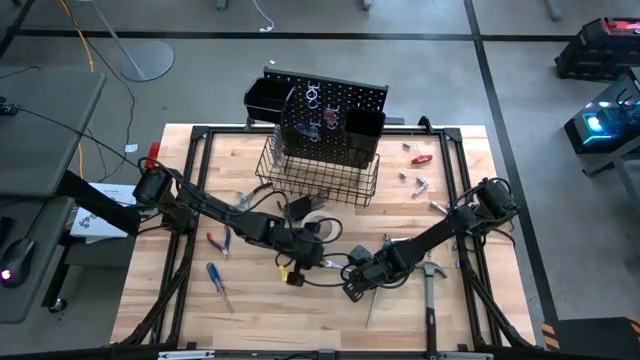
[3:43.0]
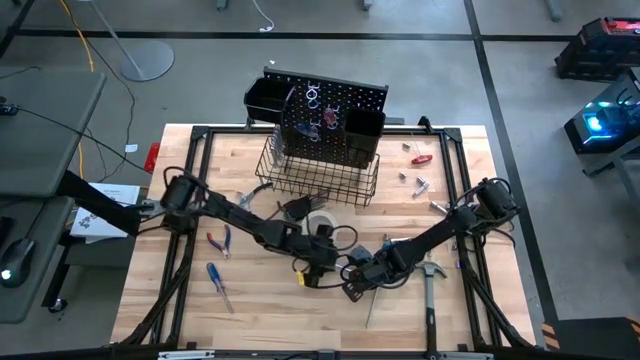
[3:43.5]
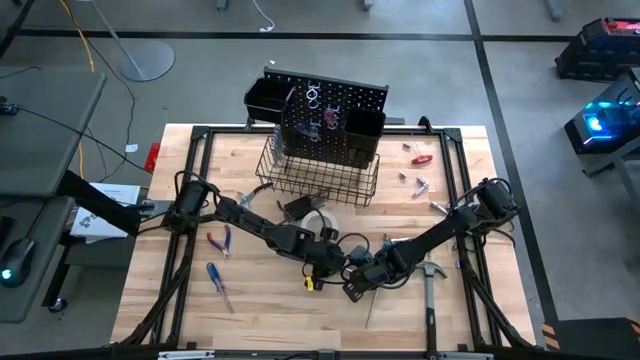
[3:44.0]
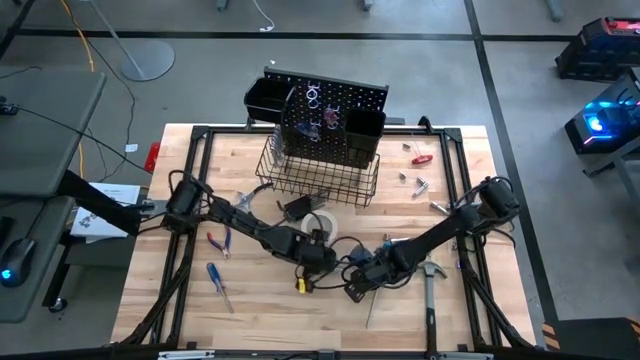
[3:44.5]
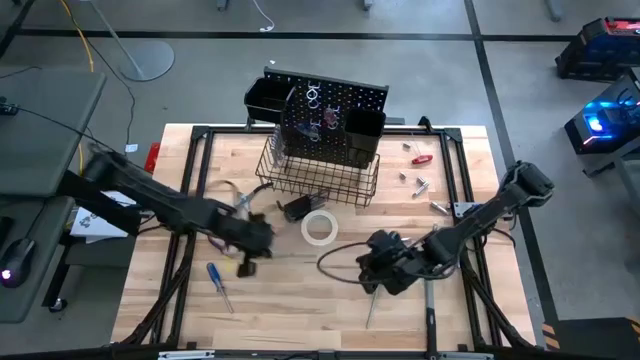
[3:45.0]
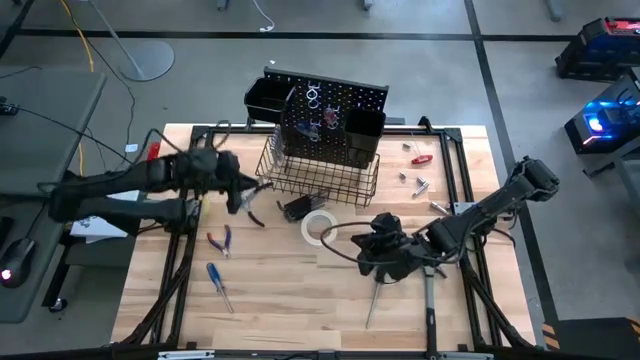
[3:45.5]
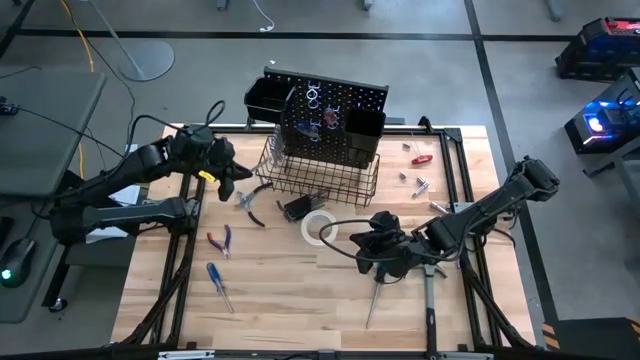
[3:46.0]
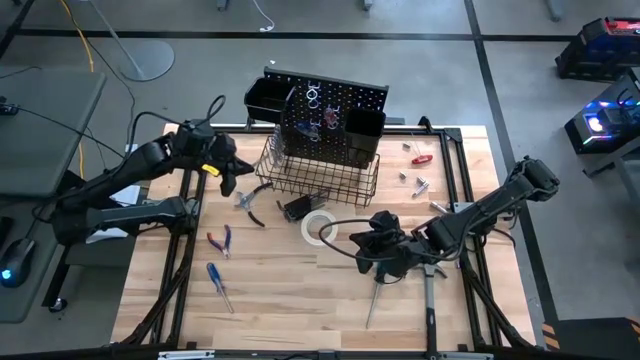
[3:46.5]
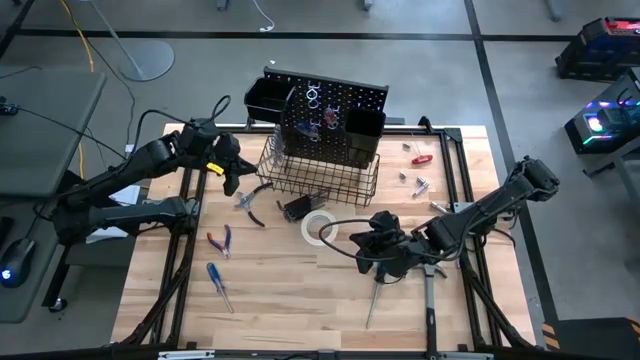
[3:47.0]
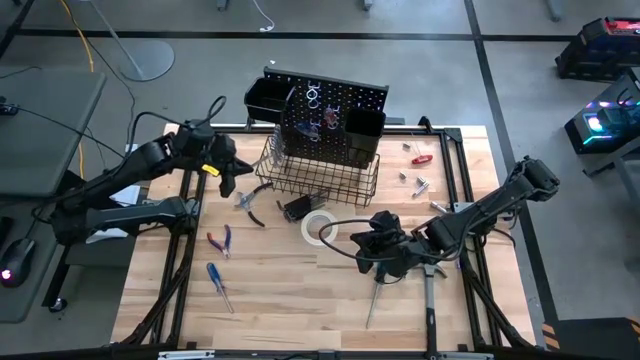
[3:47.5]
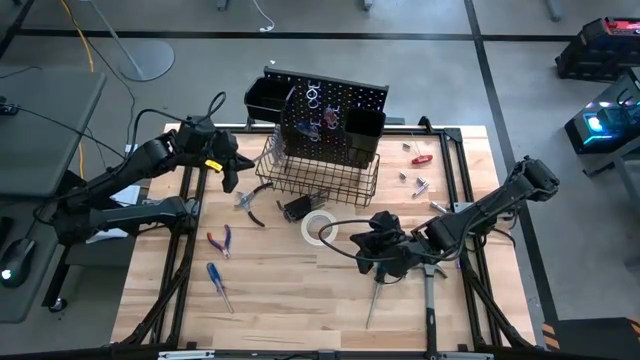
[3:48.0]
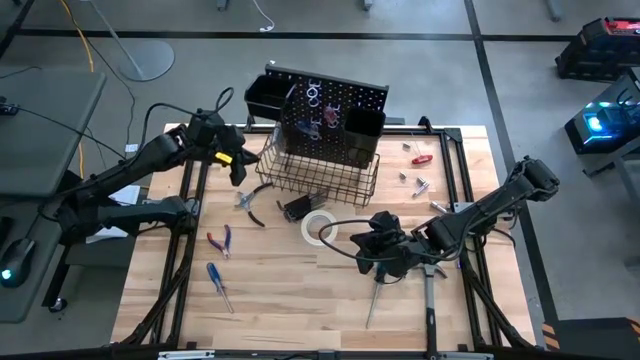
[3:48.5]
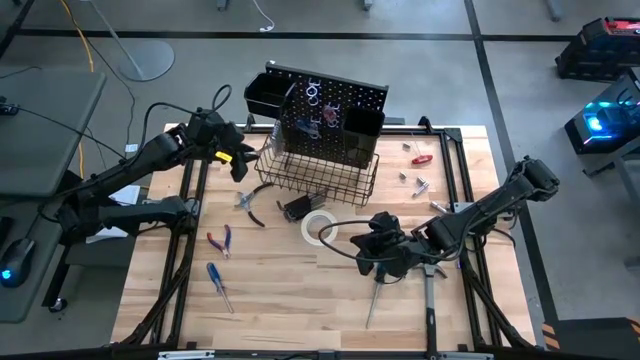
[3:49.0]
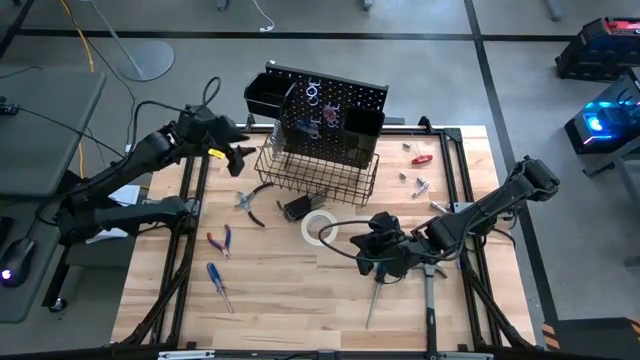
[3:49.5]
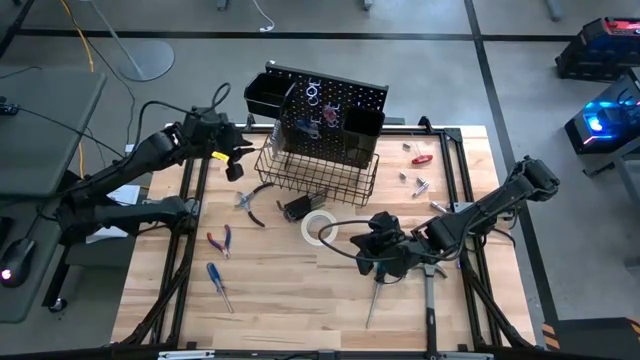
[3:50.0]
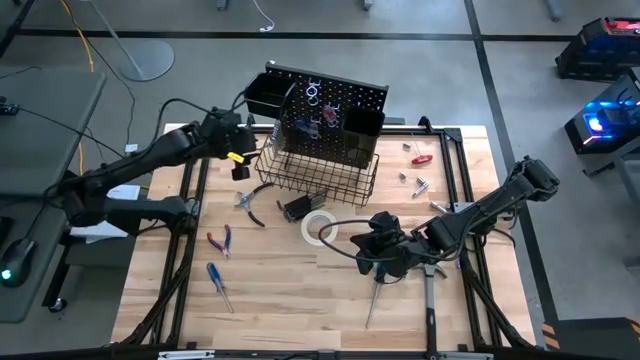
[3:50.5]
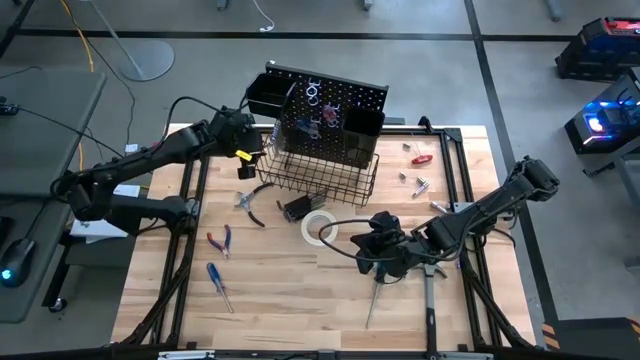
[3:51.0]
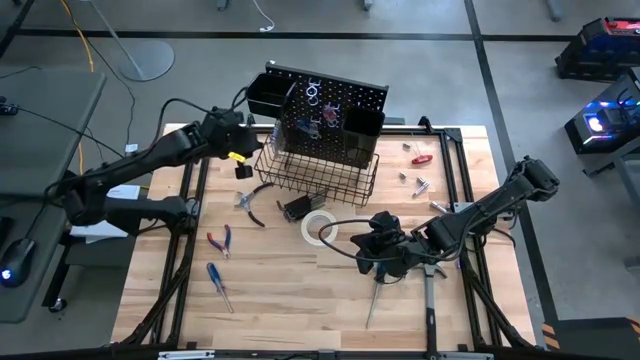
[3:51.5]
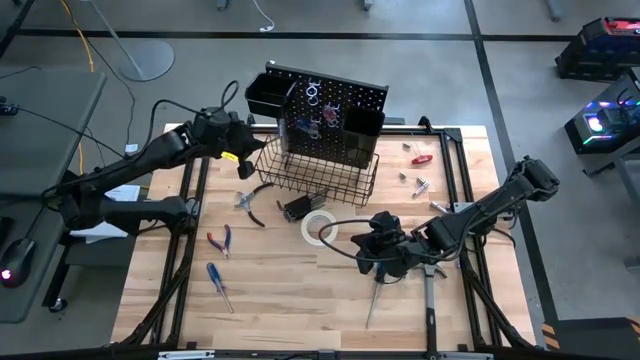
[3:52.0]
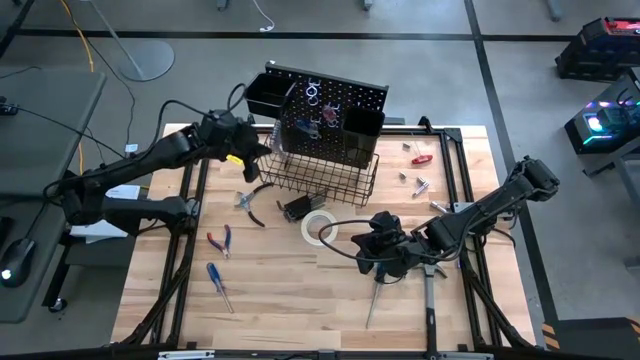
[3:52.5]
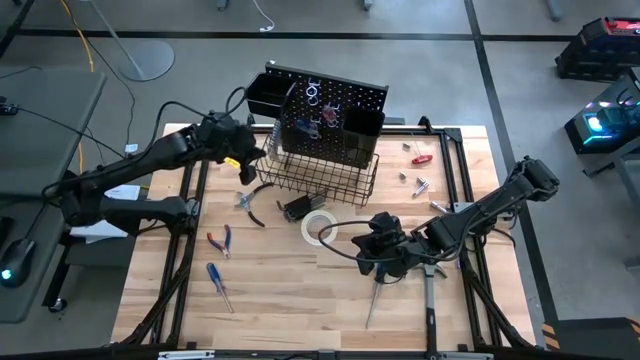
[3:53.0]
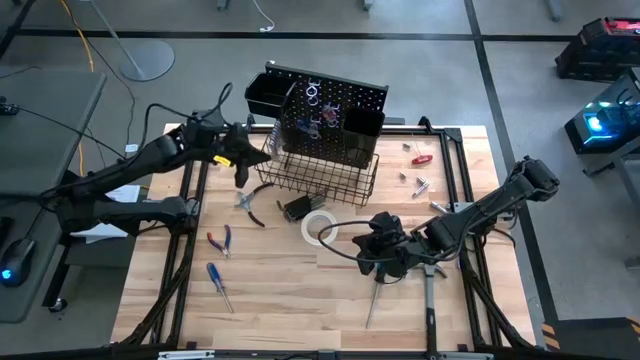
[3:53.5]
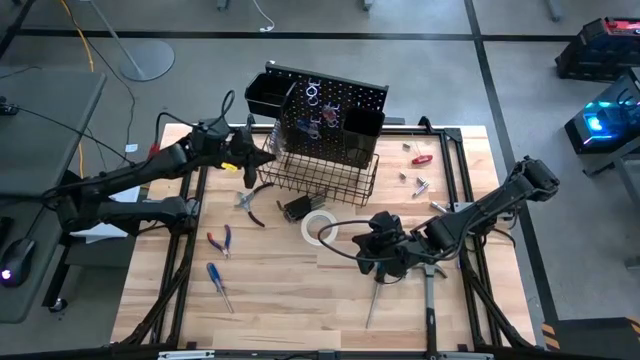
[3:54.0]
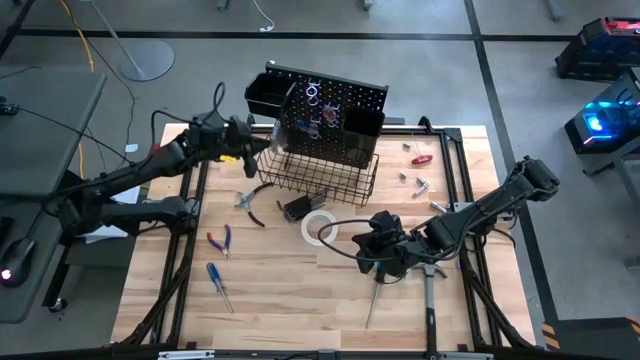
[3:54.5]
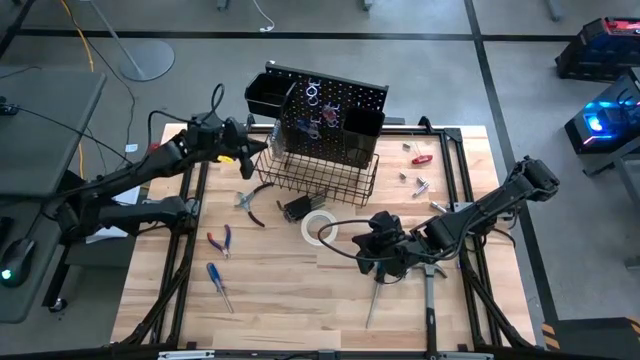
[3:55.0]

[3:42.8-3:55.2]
Task: Hang tools onto peg board
Hang the wrench on the peg board

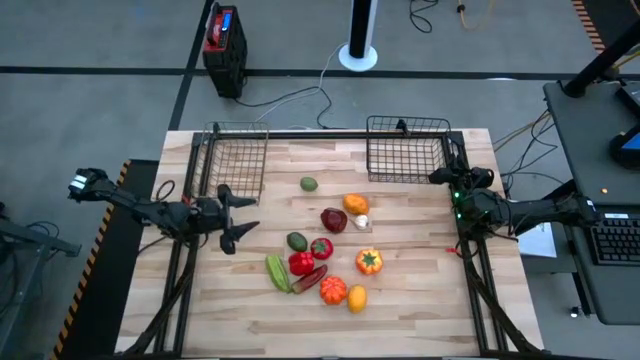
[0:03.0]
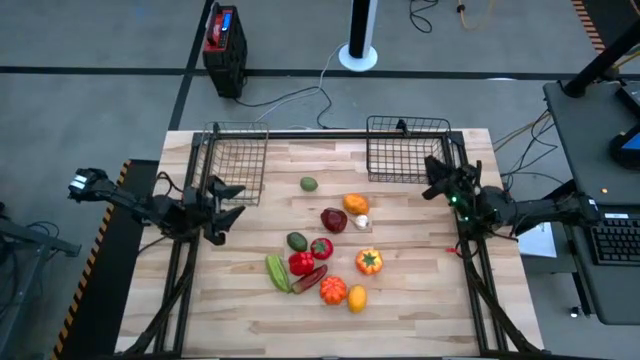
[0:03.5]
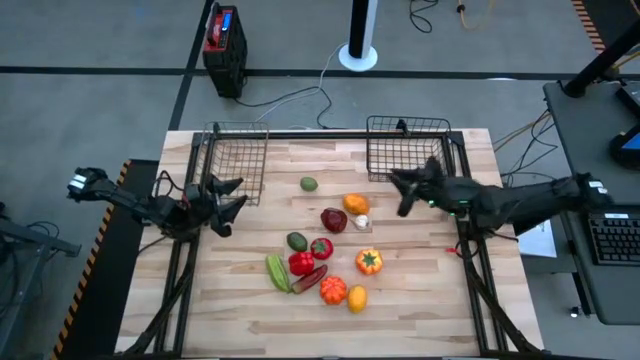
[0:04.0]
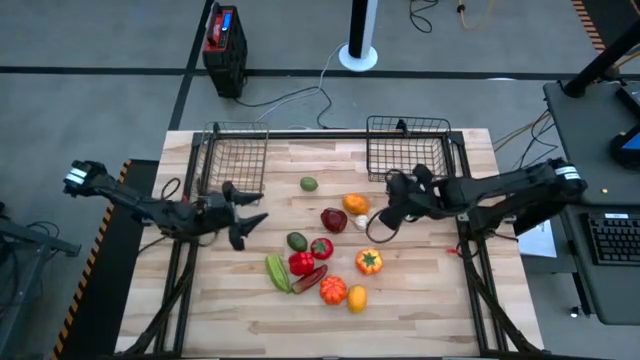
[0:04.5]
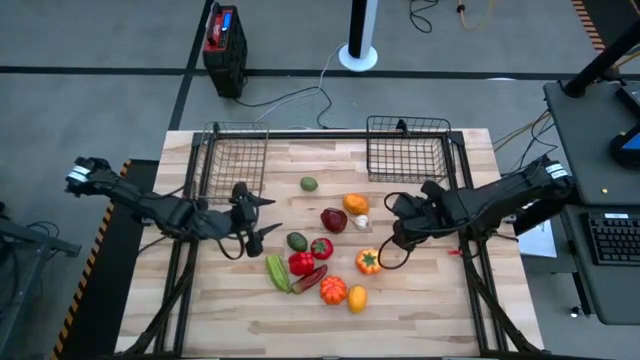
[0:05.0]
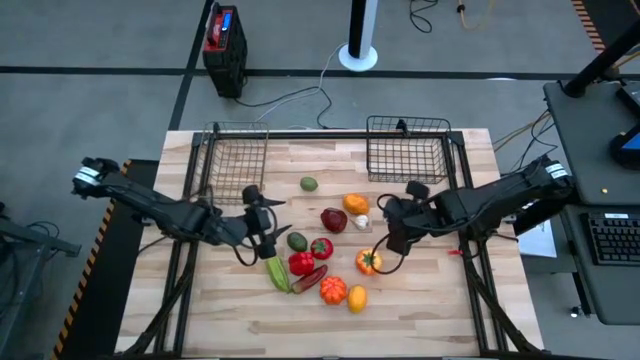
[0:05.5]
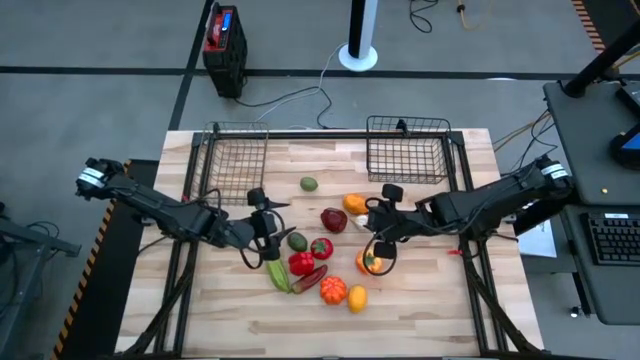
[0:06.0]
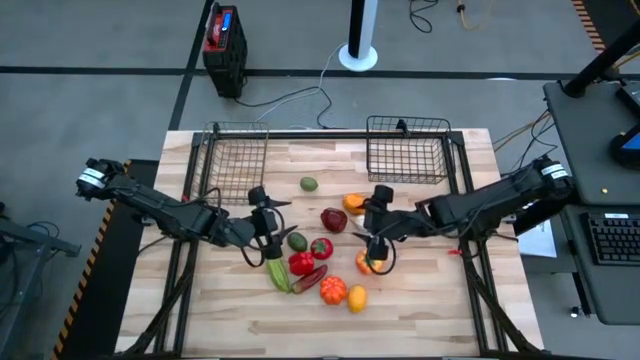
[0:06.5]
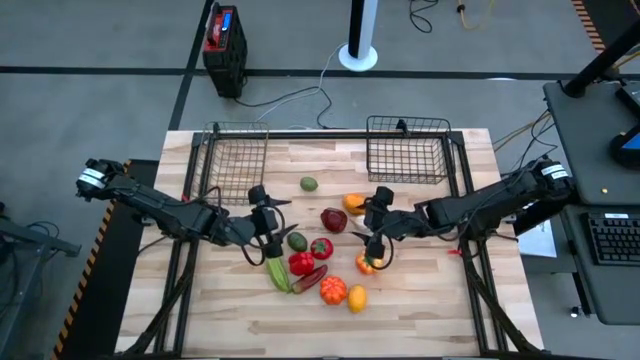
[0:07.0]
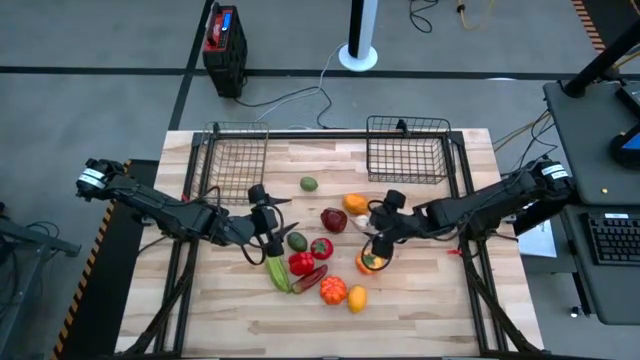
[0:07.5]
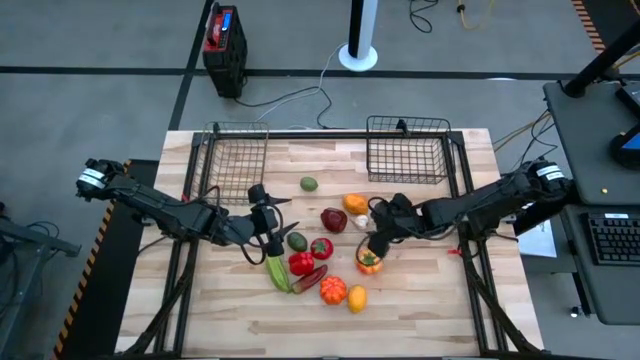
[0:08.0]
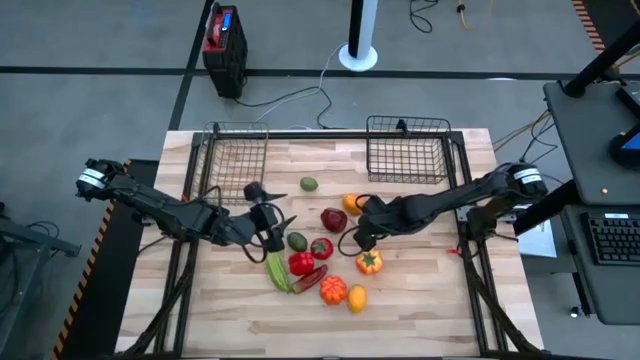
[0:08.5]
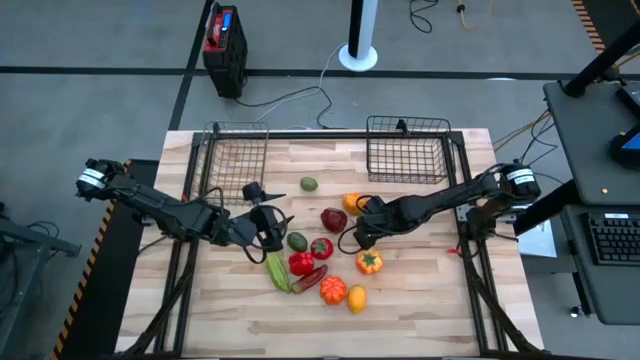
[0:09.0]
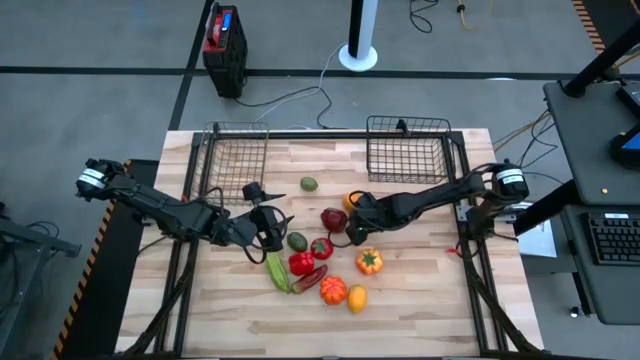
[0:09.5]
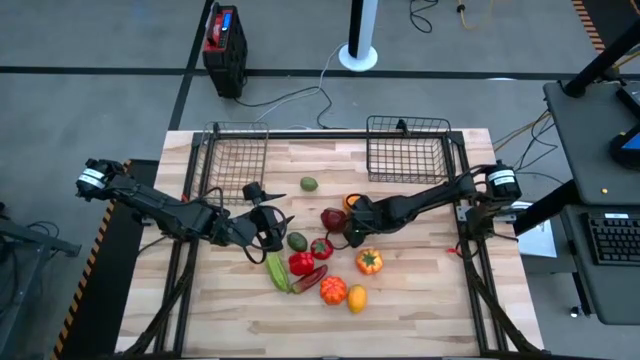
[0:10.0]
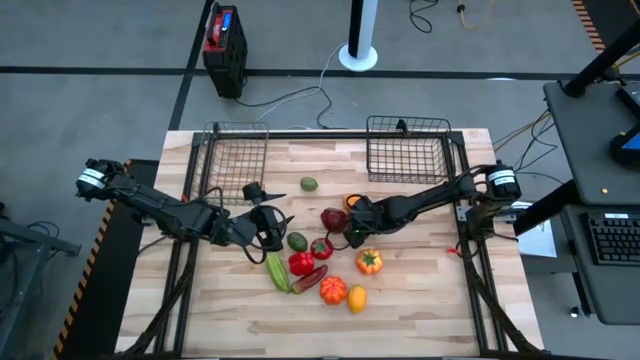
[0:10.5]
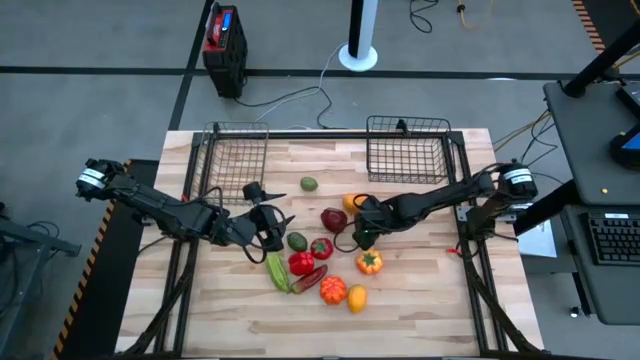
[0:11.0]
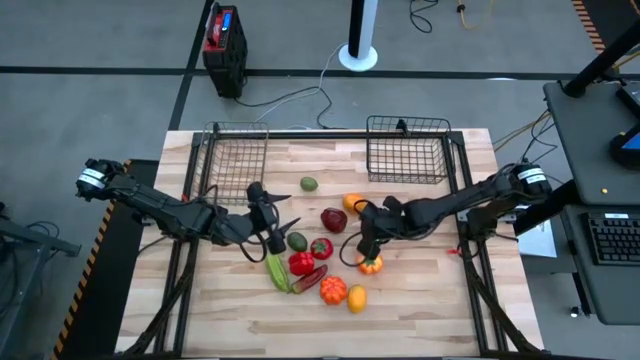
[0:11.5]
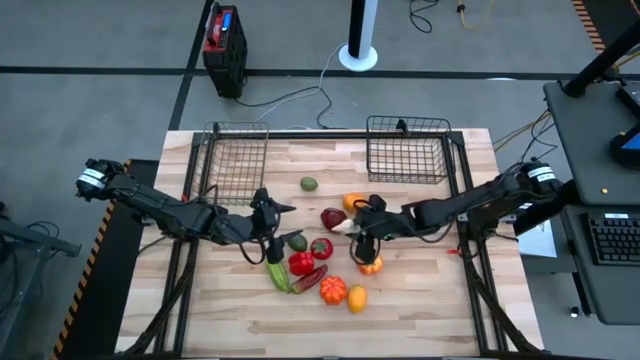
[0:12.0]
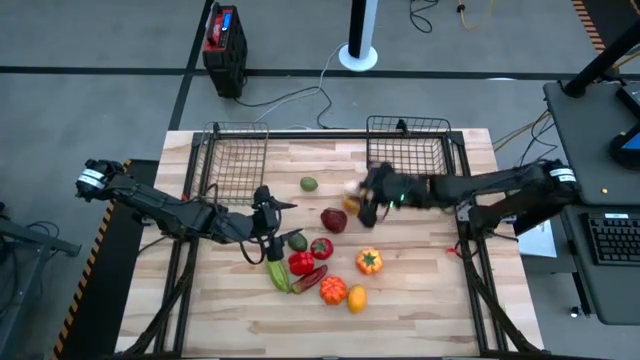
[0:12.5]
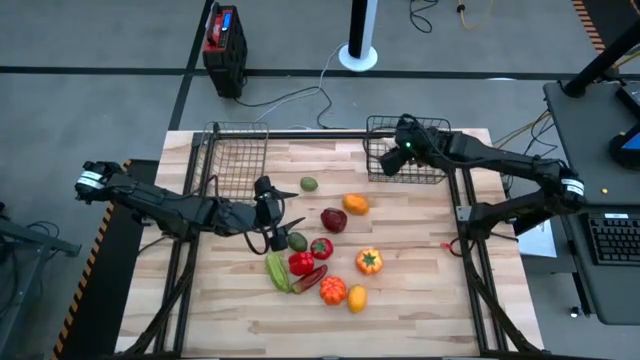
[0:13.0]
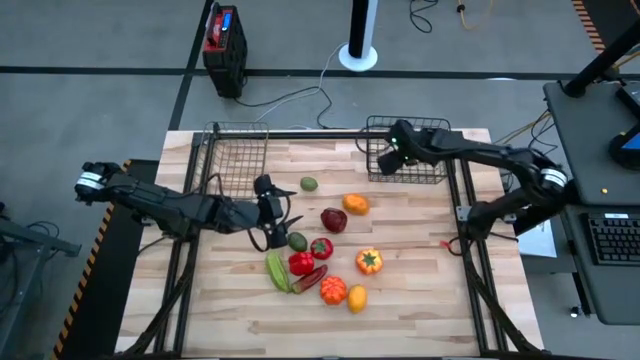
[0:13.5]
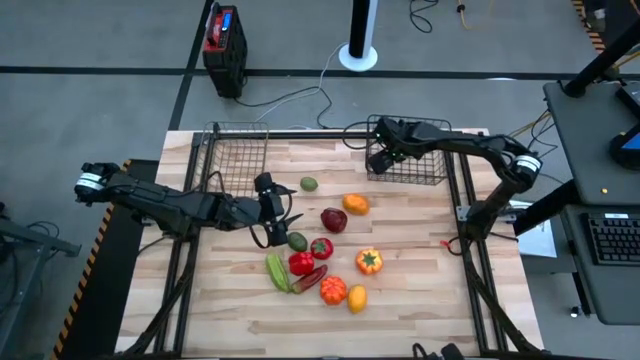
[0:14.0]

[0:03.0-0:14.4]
Task: Sort produce into baskets
Put the garlic into the black wire basket
